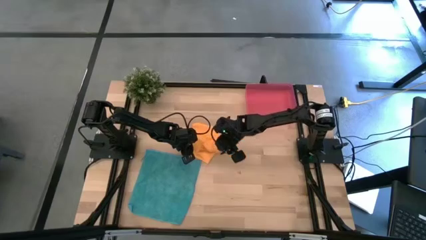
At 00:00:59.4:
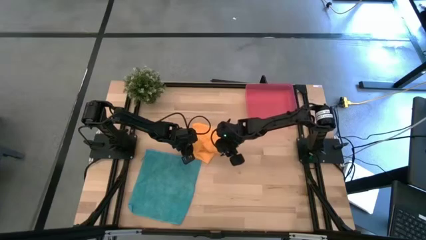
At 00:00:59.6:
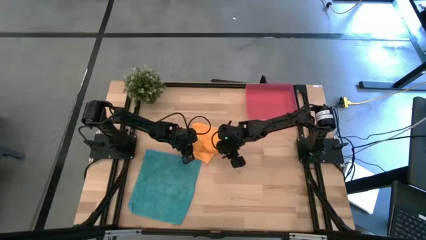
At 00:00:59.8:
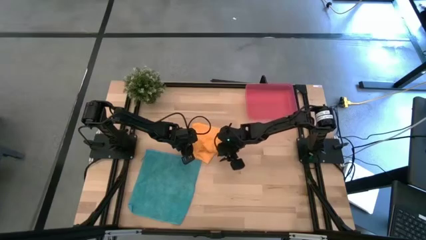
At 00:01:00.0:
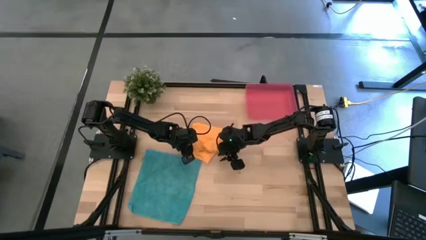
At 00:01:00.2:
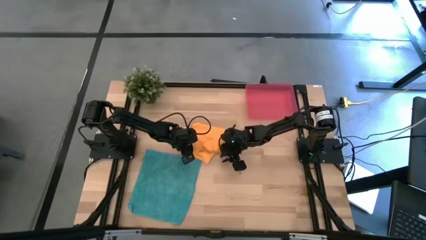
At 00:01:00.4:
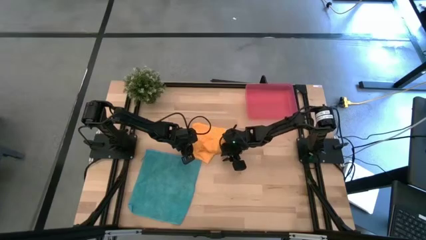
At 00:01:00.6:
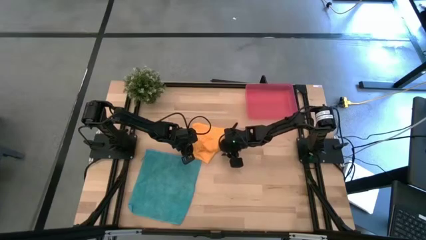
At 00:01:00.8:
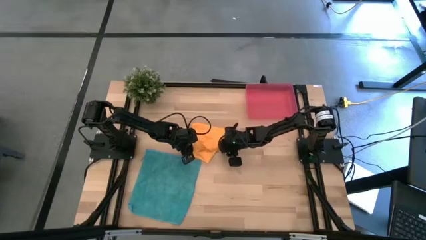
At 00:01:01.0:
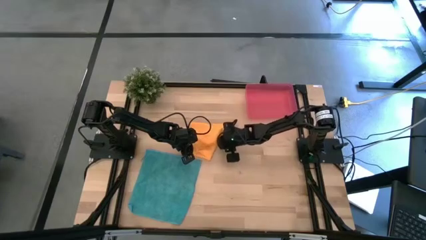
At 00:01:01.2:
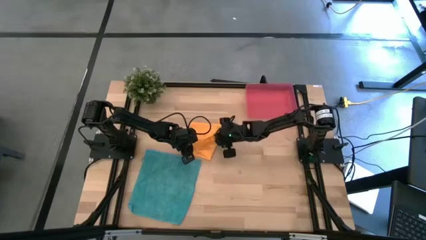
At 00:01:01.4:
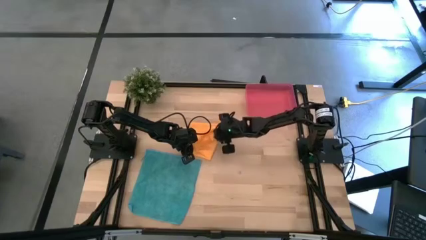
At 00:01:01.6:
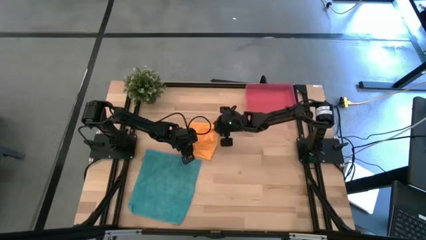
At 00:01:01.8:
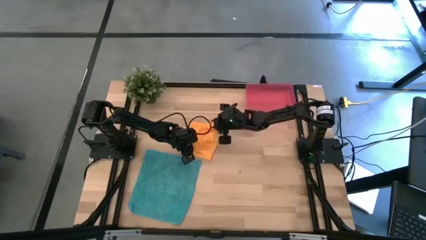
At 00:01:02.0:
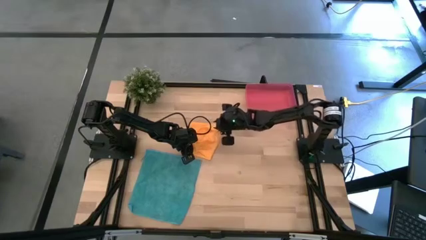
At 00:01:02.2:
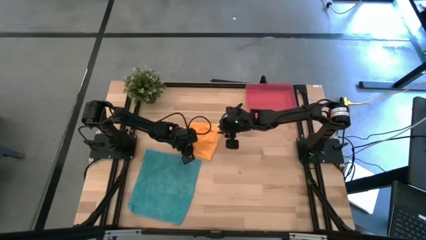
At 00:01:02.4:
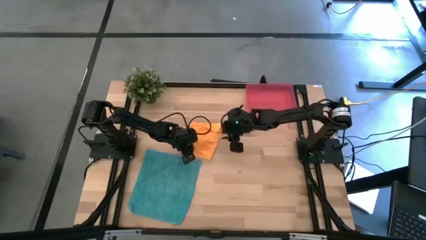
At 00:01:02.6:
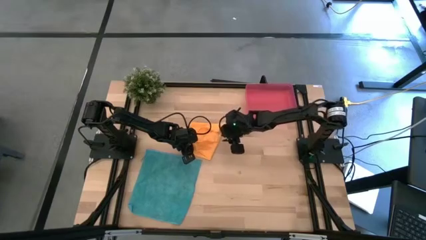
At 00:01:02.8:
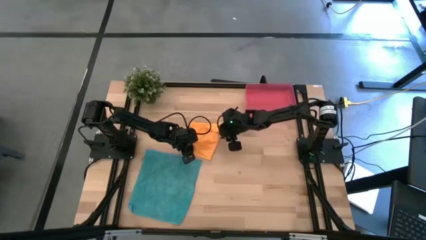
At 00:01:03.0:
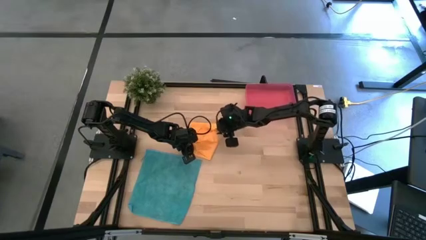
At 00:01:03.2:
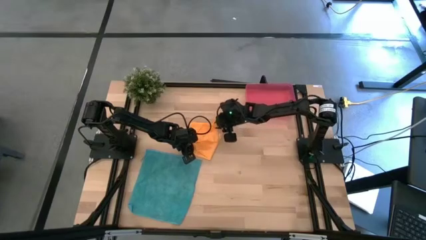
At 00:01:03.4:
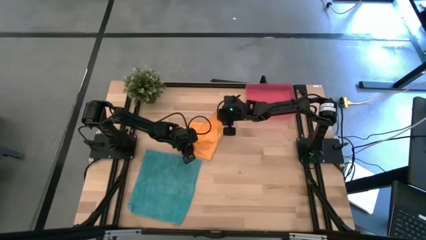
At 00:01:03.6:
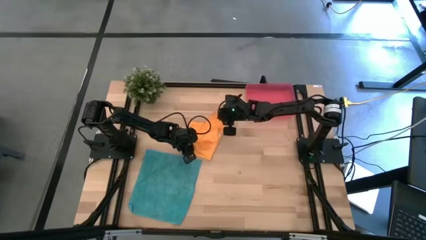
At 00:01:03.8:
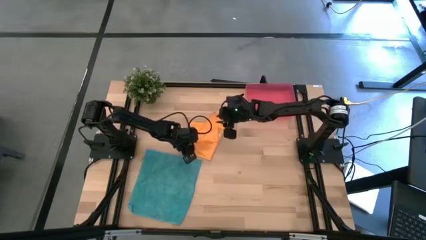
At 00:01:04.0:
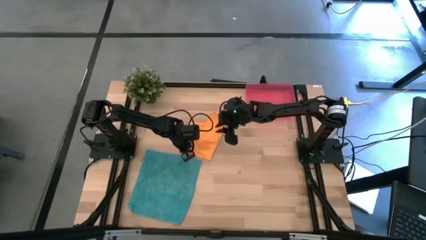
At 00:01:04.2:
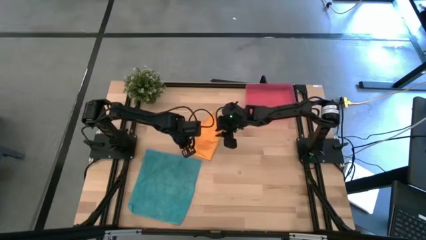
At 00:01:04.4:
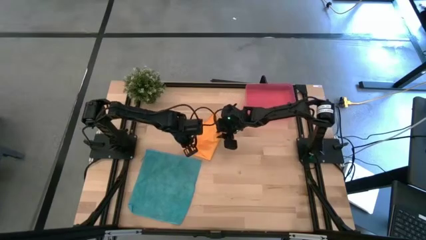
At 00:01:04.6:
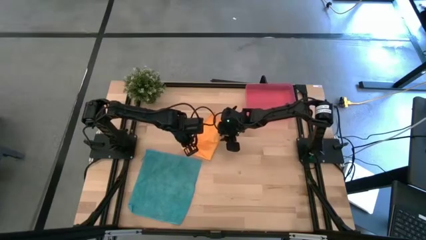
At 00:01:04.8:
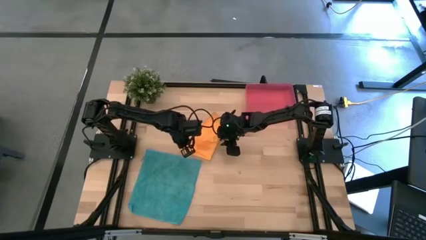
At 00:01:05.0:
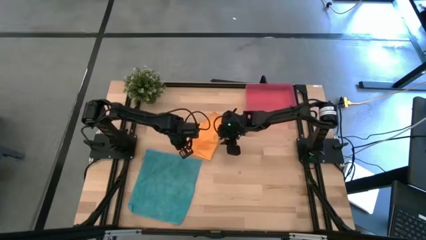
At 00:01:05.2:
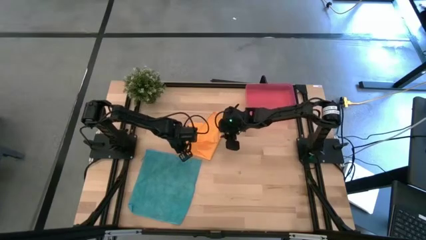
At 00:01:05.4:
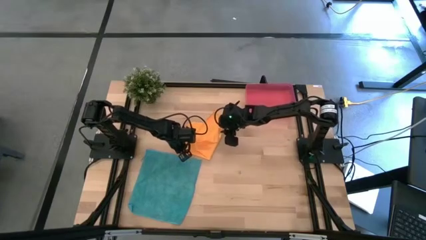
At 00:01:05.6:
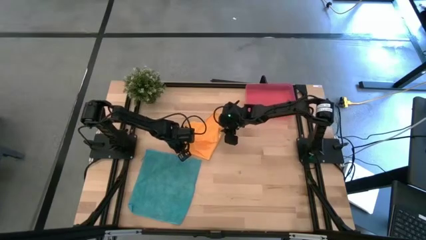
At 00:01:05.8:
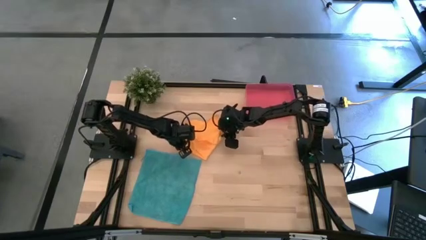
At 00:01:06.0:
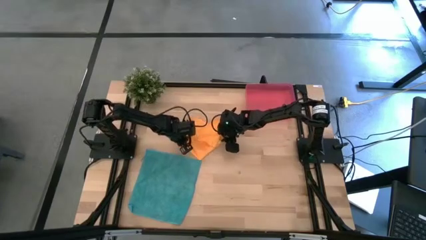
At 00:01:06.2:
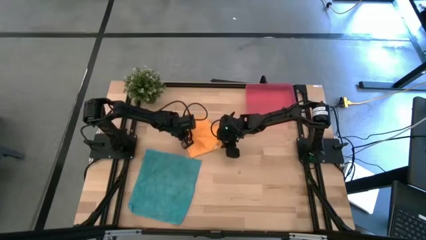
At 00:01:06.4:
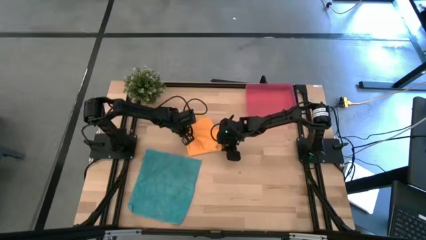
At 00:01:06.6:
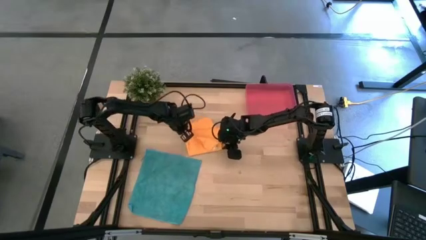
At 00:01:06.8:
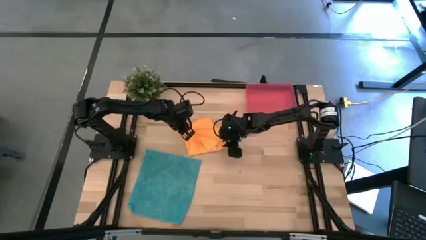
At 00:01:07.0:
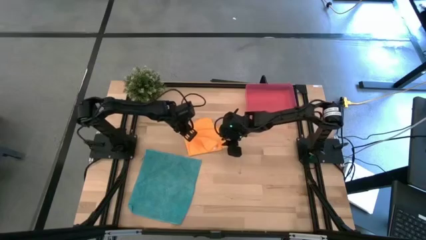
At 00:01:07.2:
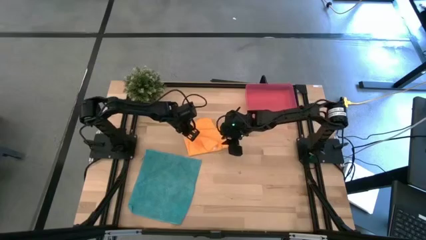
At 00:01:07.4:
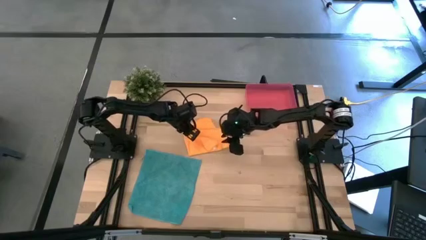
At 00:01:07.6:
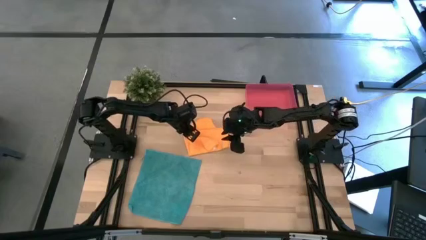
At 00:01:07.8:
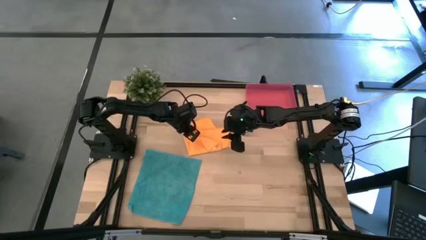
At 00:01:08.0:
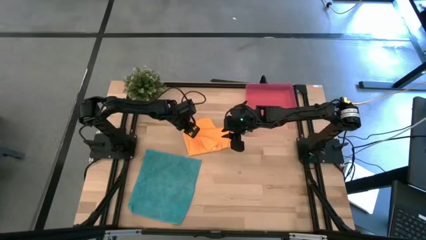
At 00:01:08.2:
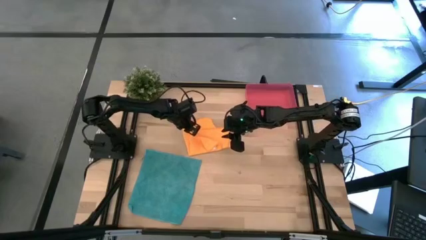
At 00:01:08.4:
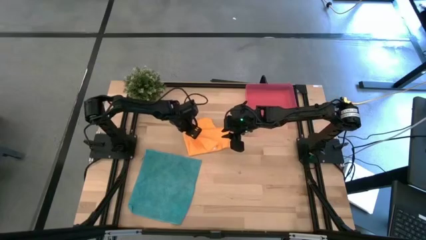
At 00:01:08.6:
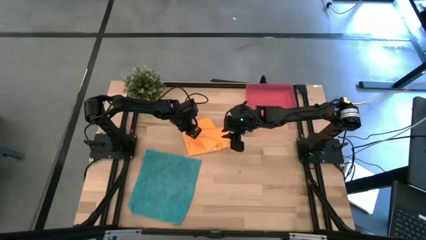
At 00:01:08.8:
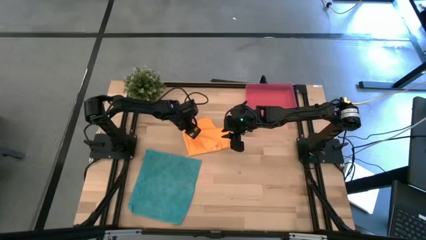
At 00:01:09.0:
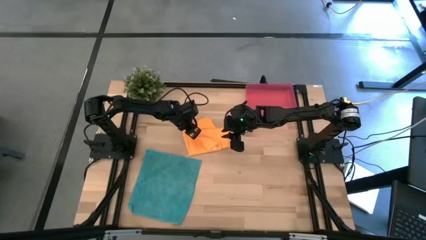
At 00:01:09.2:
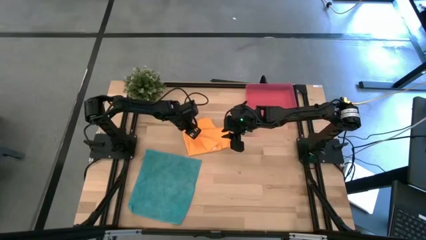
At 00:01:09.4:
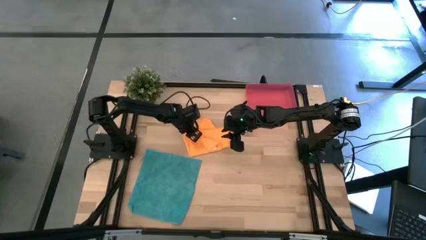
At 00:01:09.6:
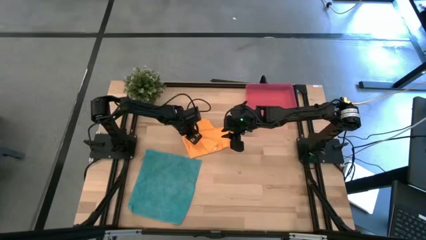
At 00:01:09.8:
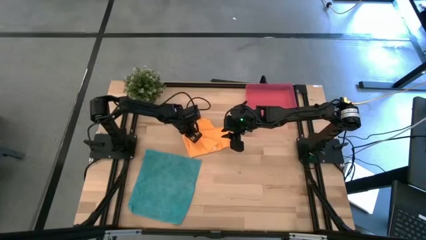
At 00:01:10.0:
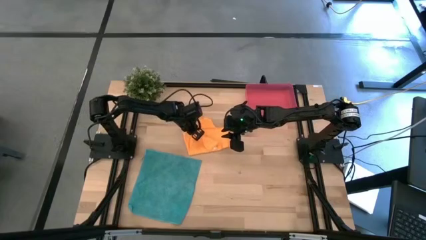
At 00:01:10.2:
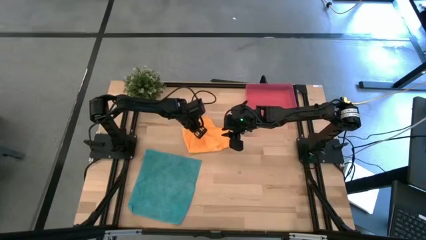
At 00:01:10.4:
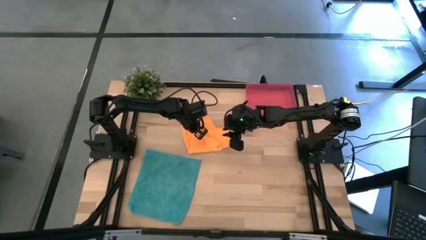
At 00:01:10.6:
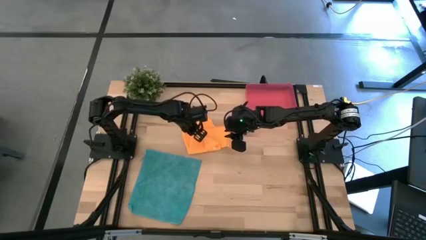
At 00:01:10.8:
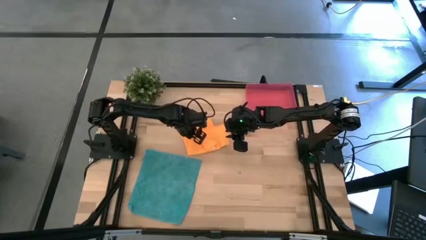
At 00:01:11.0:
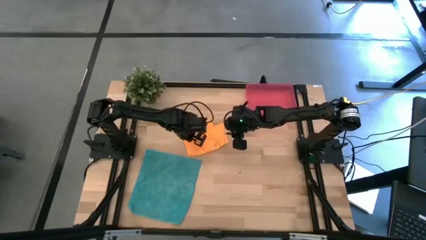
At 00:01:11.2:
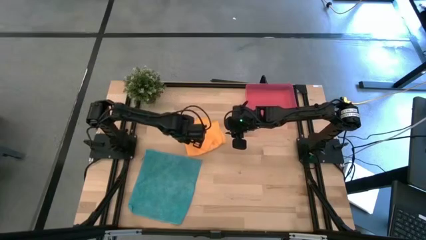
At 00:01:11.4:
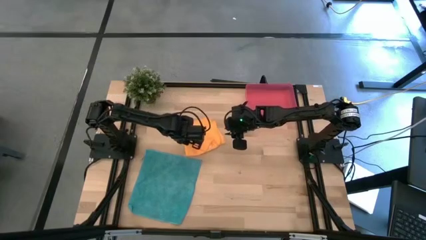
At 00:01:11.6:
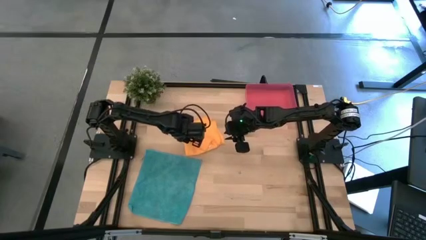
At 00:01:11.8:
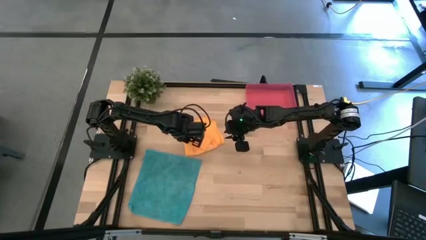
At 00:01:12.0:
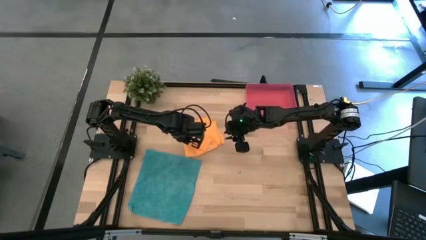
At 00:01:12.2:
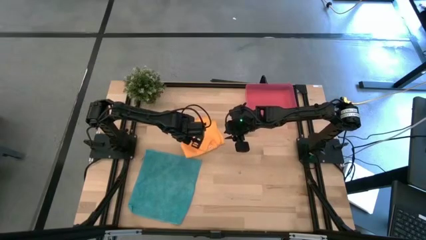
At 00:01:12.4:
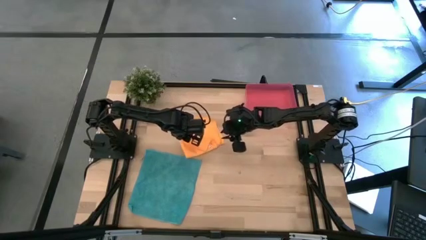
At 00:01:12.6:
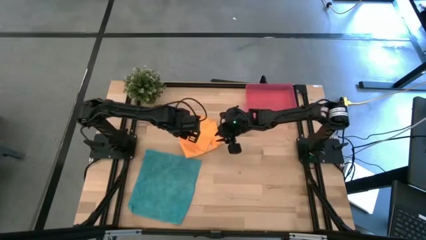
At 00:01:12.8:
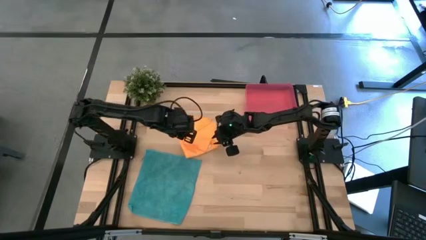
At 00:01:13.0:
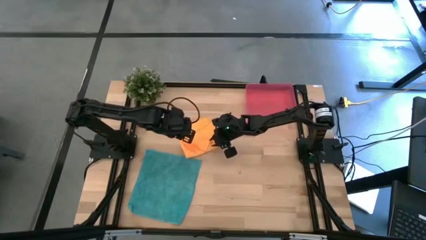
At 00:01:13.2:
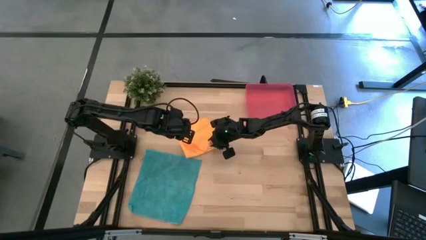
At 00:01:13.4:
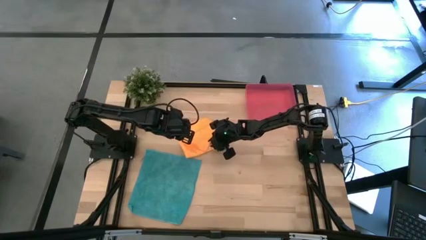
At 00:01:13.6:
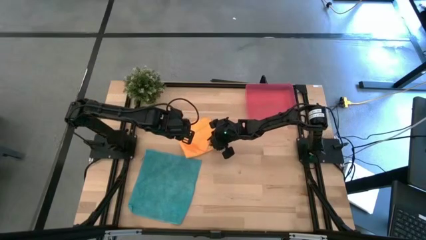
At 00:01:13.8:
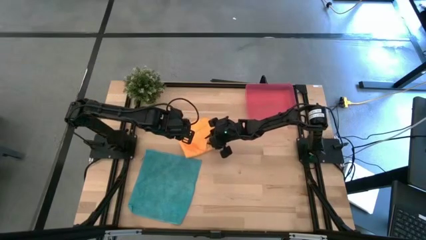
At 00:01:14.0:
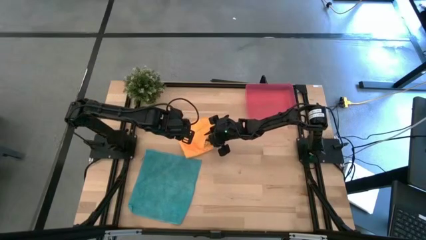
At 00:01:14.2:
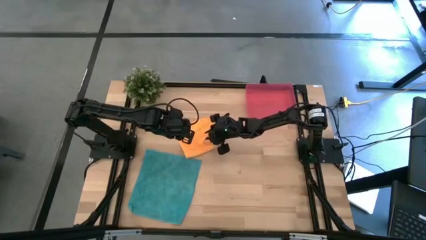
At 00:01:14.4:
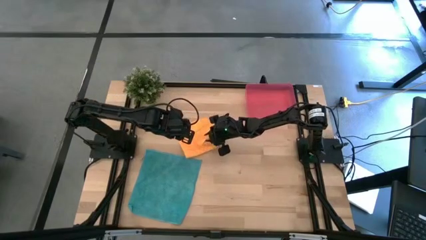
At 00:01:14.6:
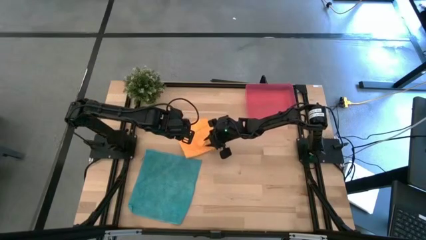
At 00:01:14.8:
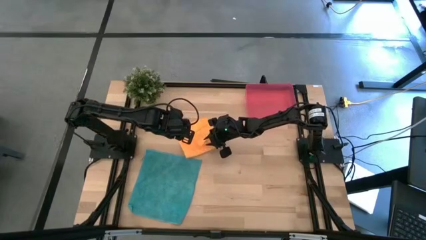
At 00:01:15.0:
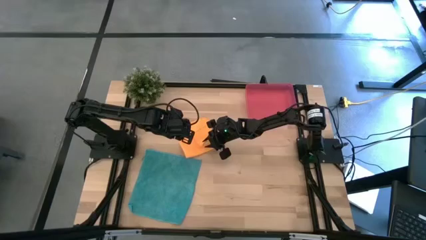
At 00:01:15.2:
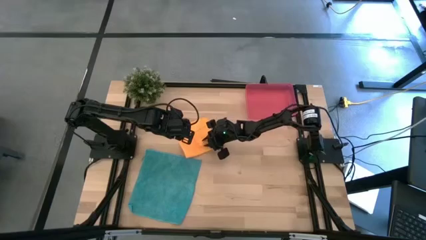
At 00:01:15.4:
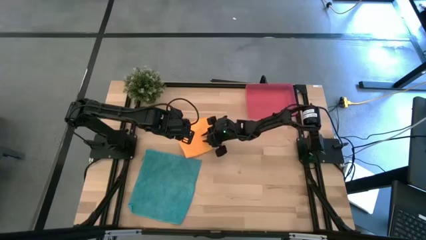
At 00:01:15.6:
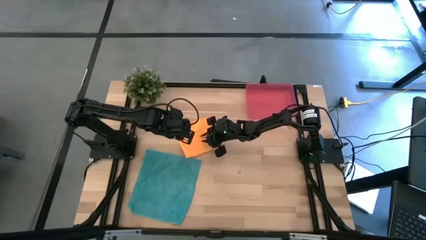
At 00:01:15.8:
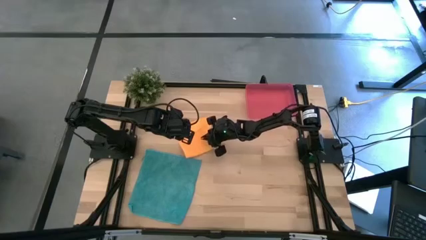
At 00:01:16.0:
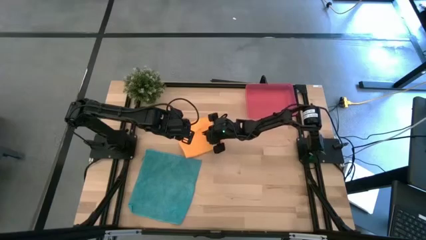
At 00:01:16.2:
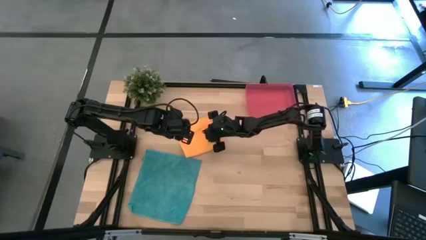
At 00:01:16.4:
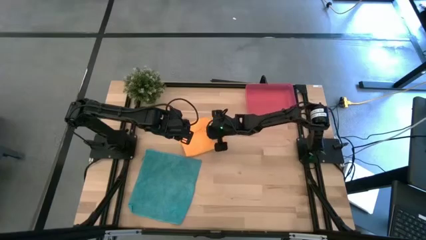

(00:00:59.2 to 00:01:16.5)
Task: Roll microfiber towels into tight, uniform cylinder then place into a basket
Fold the orange microfiber towel
